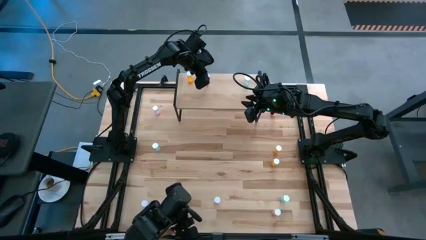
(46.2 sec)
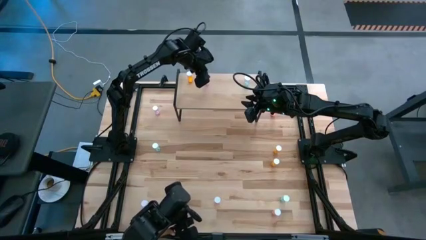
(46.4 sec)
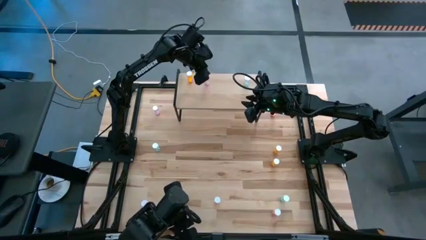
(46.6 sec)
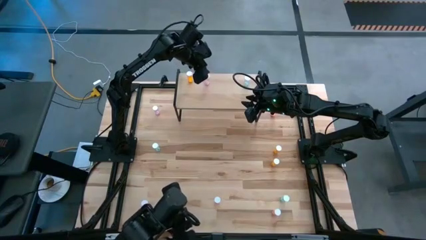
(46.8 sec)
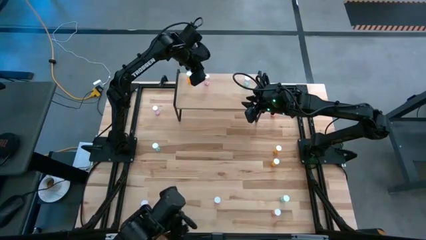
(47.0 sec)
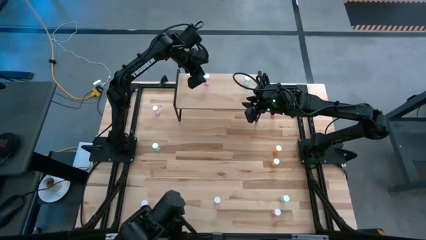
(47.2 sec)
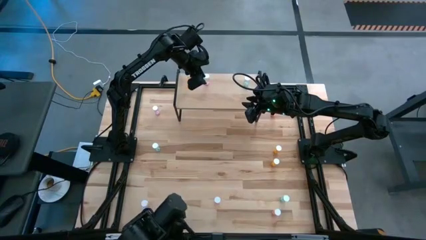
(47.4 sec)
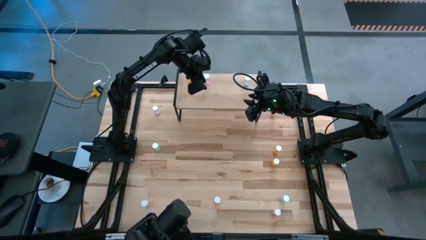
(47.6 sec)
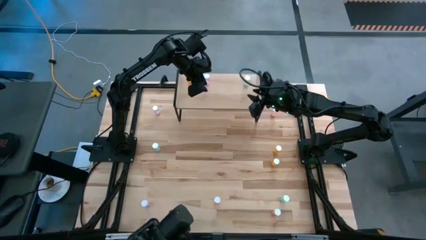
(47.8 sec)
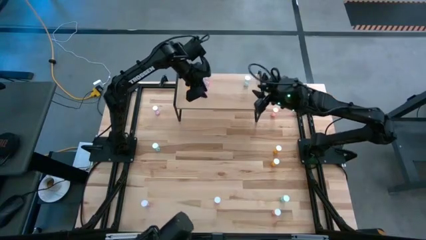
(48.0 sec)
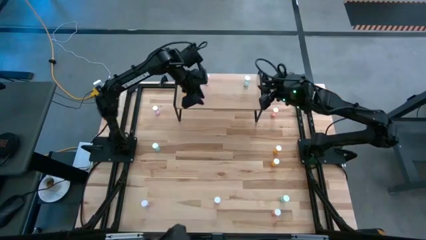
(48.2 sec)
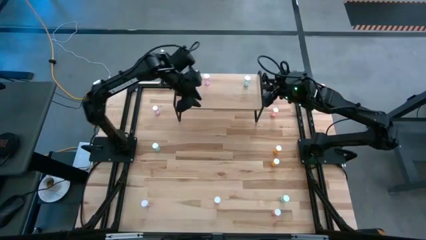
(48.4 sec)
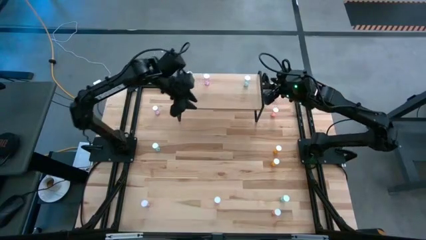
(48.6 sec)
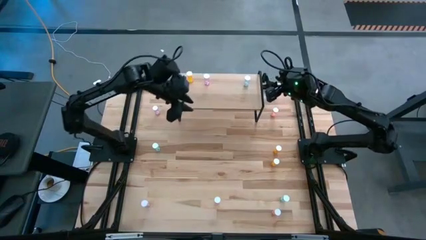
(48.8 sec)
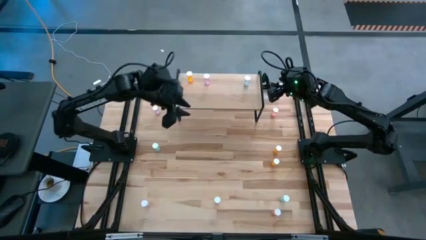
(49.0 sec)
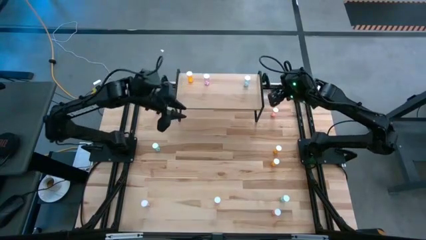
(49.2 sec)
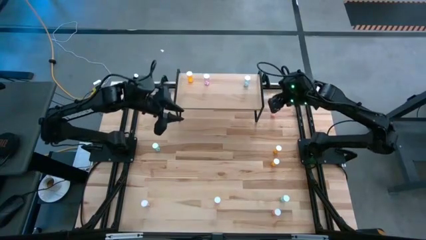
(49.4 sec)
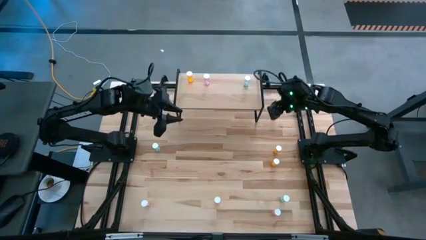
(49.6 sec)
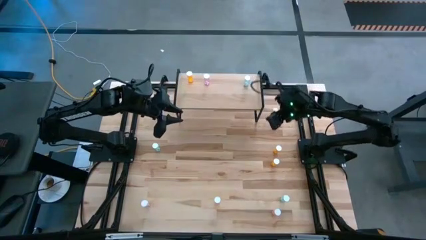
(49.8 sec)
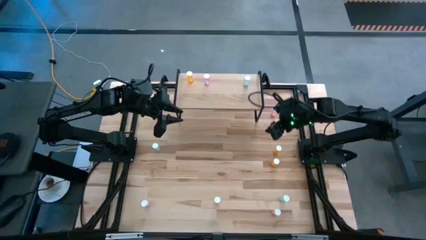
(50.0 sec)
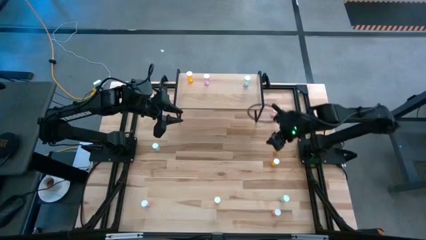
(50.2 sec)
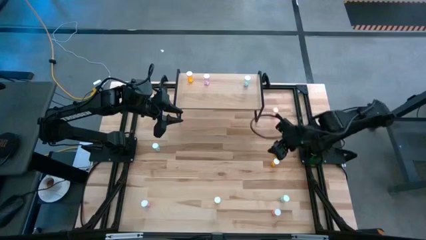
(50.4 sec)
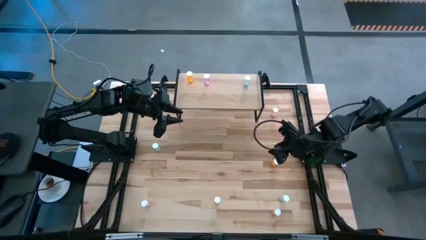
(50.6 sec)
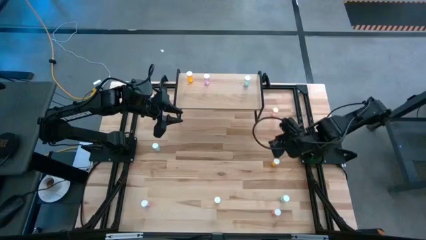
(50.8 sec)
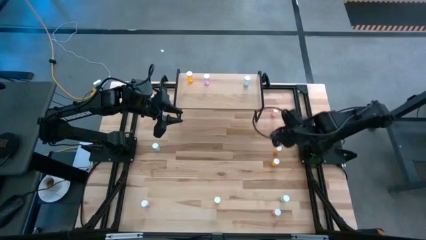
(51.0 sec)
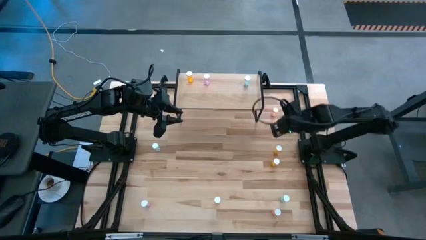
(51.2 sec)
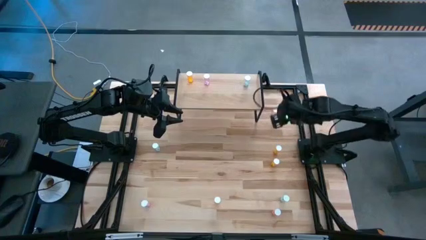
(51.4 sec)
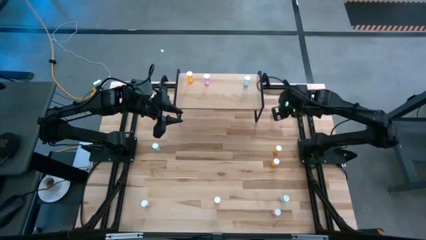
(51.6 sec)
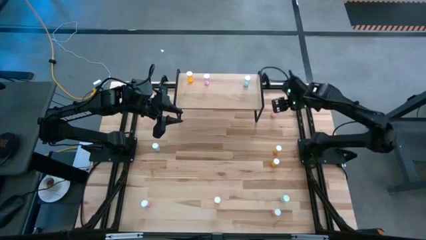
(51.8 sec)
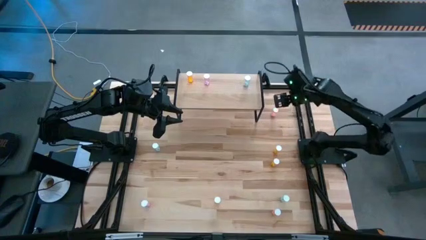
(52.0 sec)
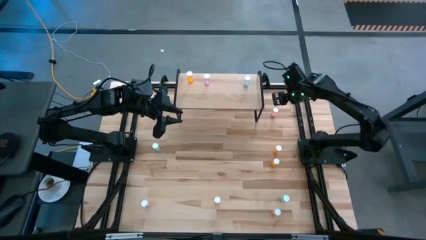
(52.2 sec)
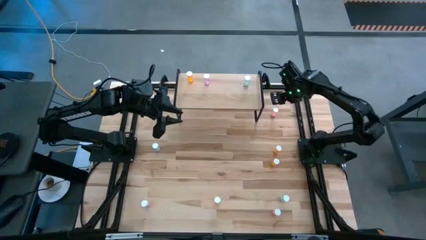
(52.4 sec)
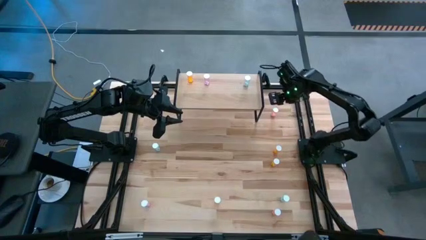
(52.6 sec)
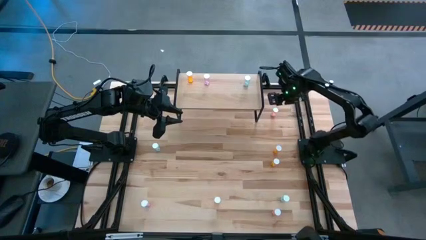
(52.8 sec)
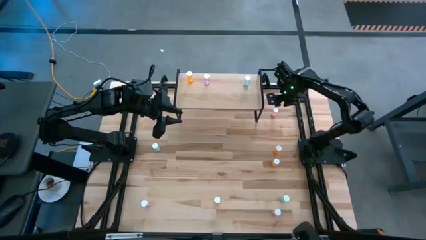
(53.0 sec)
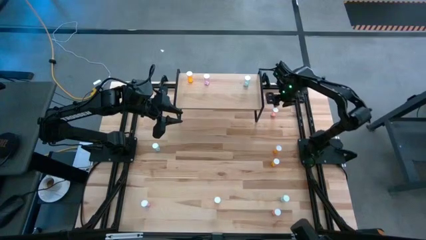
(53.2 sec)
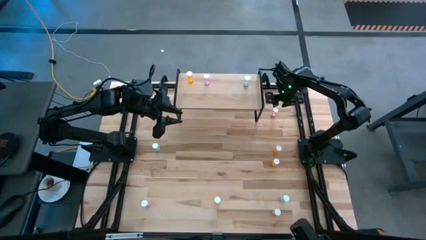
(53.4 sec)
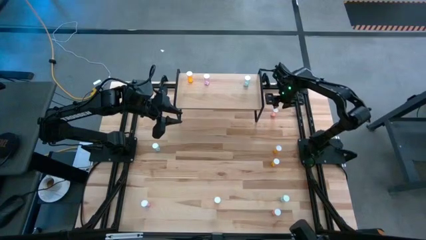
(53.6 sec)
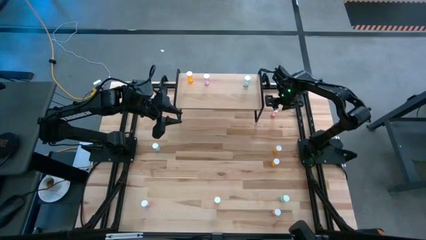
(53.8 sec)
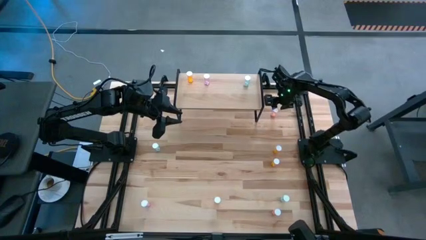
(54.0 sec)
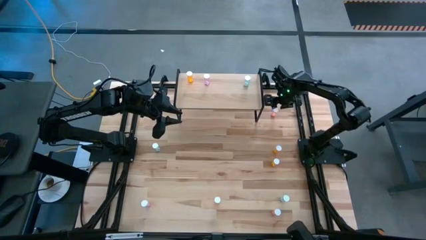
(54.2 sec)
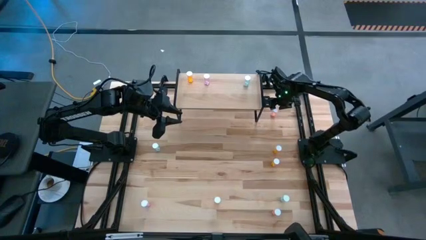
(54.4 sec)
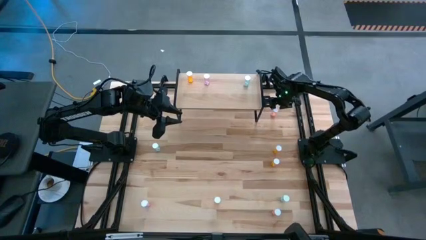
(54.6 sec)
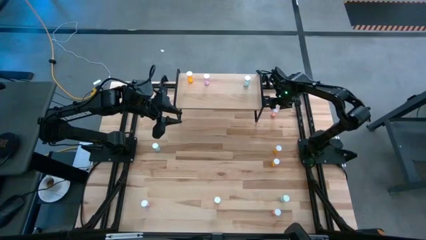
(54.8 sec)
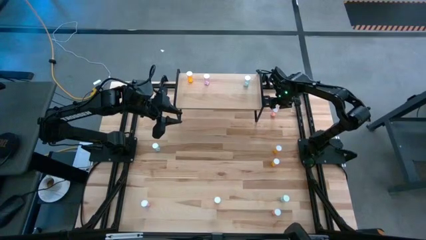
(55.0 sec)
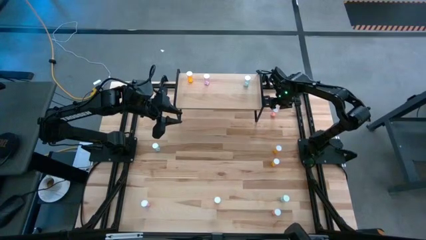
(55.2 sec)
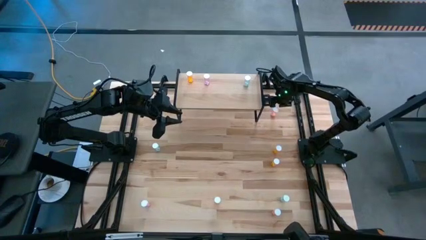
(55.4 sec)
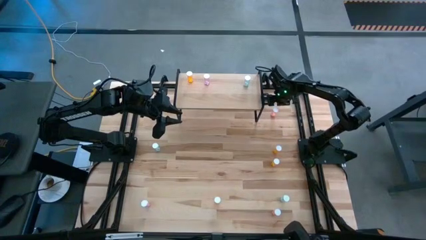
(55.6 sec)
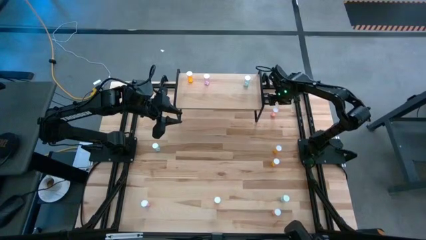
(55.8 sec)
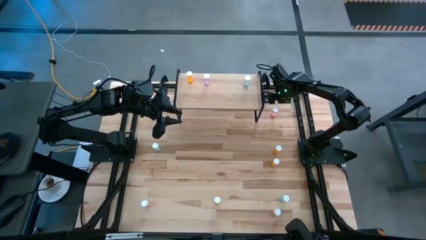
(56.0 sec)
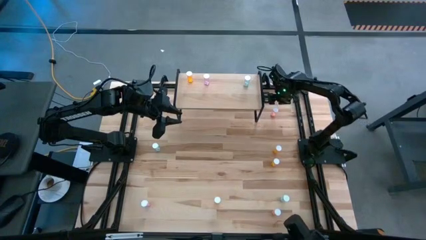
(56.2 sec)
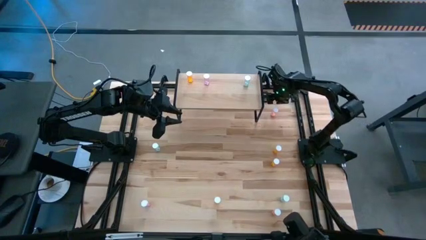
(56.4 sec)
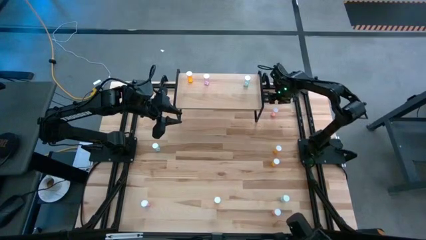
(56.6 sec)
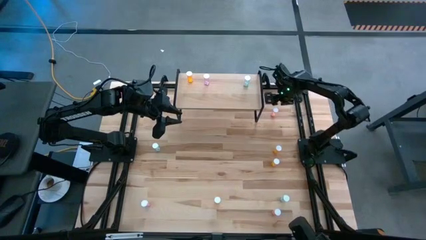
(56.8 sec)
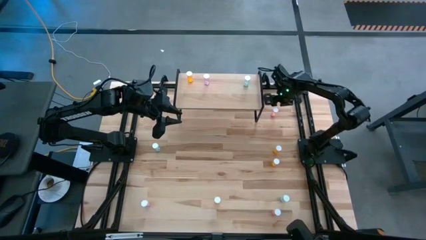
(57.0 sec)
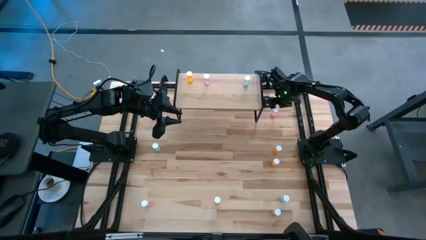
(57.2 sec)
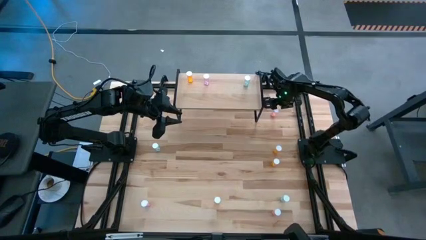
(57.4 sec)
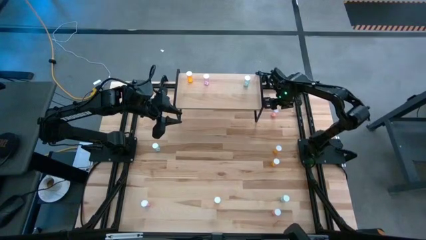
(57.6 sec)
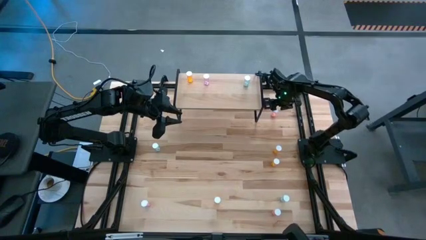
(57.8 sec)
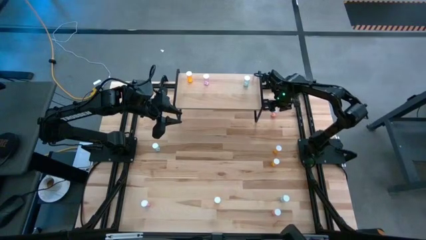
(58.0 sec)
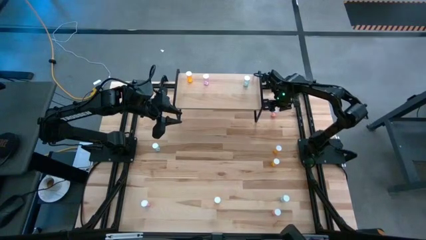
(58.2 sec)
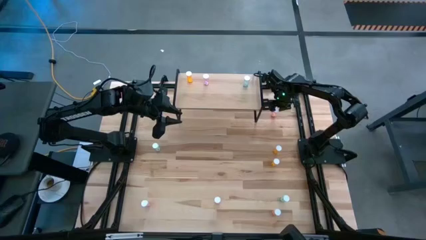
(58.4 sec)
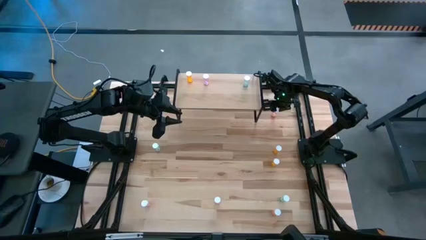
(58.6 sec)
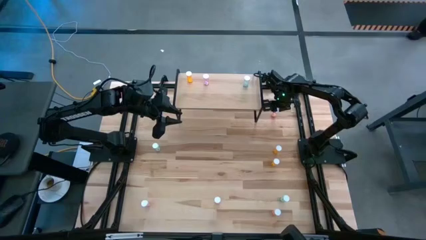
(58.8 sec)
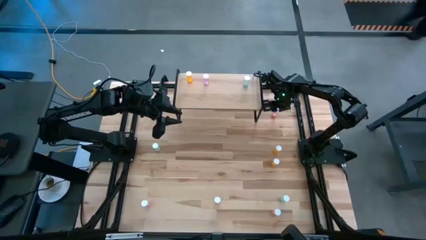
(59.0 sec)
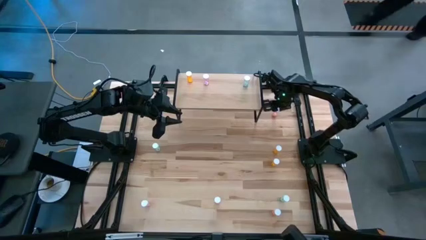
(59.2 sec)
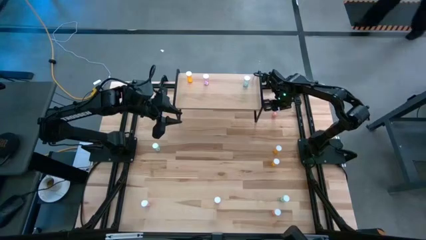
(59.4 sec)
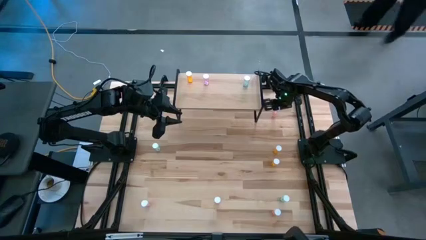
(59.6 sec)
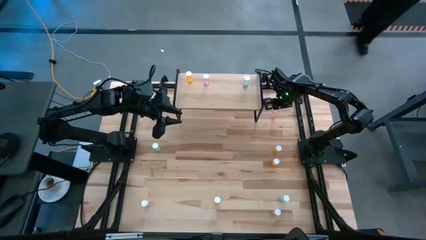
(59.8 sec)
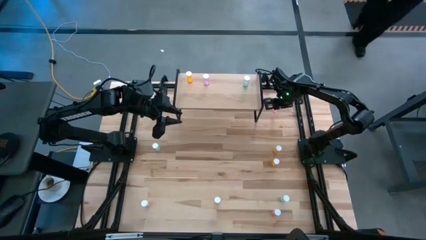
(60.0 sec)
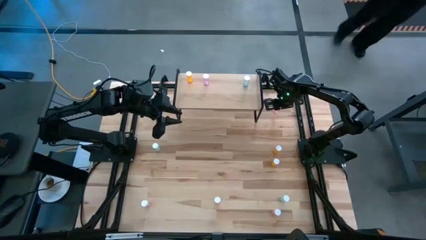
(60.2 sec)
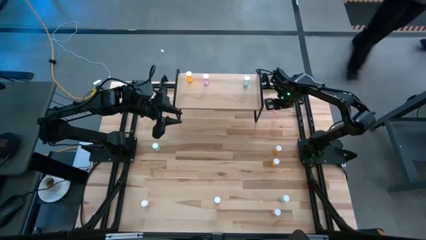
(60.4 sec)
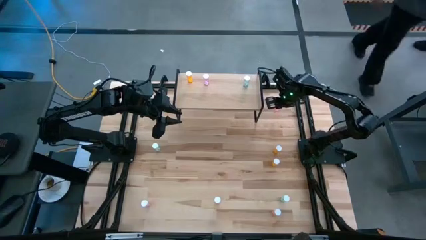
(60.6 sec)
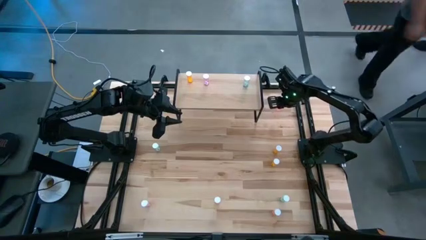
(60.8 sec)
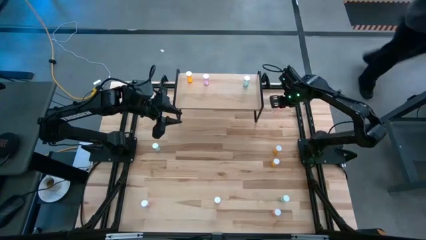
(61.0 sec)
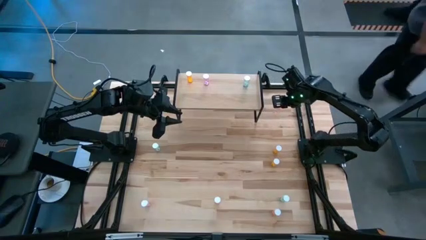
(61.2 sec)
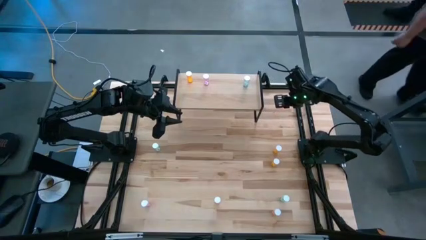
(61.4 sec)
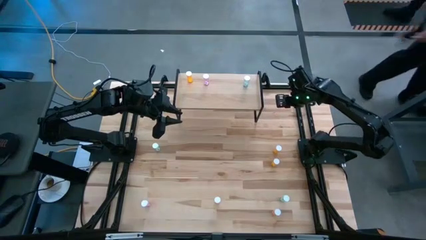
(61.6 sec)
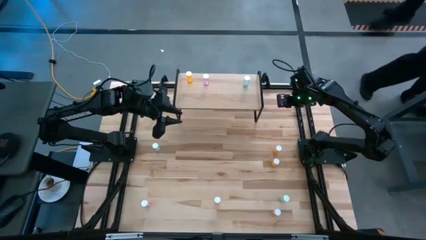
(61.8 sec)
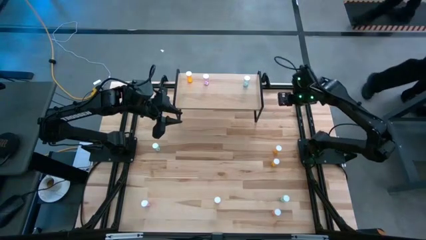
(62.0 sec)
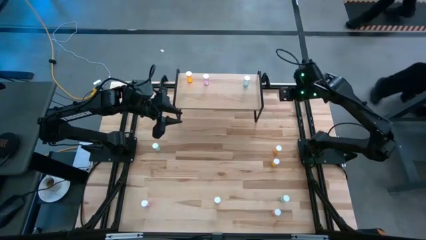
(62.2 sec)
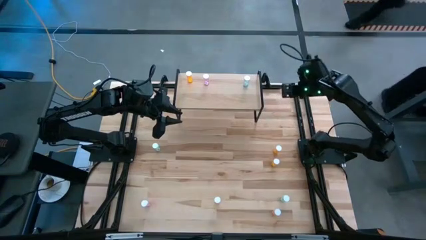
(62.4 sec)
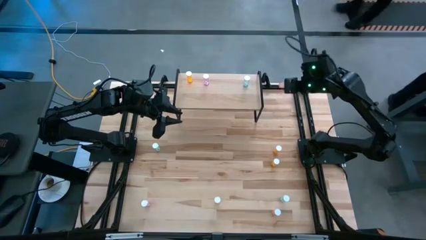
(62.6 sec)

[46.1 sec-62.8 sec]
Task: Pick and place medicine bottles onto shelf by color
Put the top pink pill bottle on the shelf
